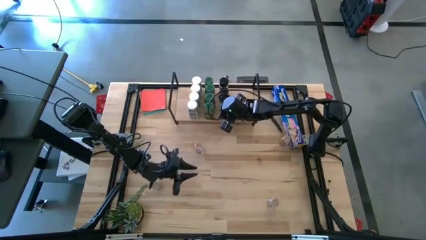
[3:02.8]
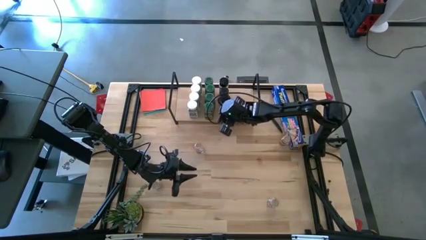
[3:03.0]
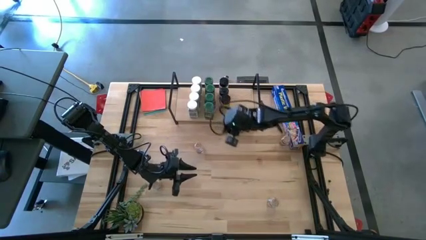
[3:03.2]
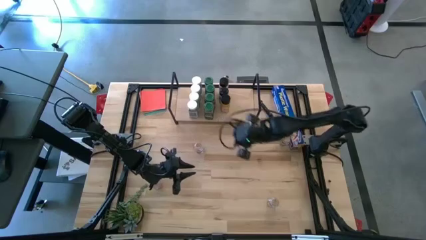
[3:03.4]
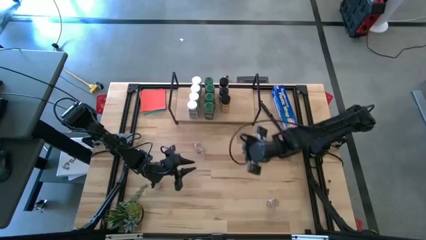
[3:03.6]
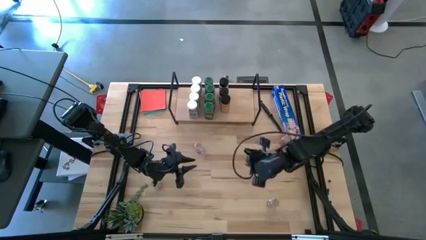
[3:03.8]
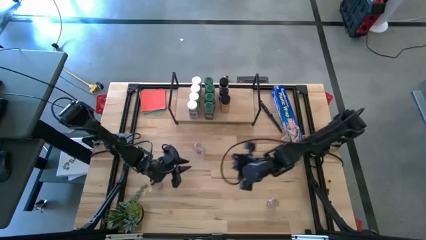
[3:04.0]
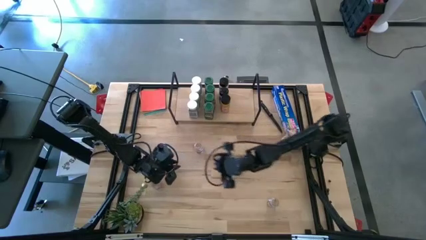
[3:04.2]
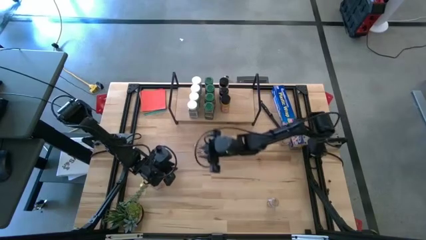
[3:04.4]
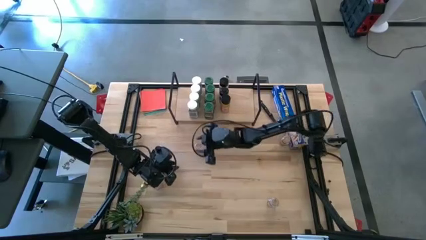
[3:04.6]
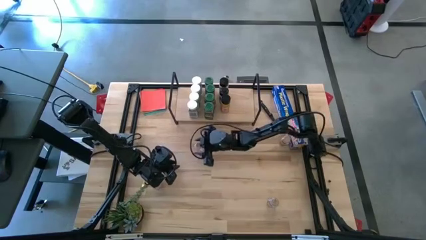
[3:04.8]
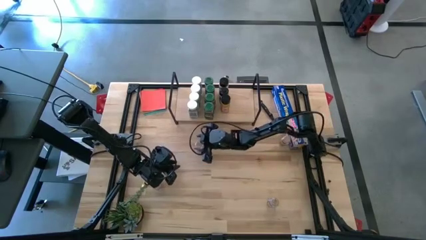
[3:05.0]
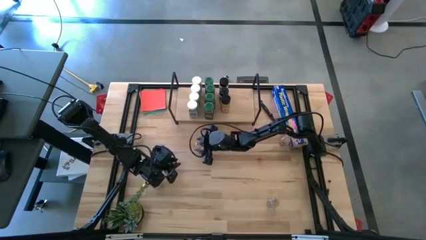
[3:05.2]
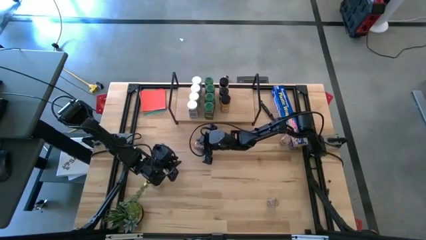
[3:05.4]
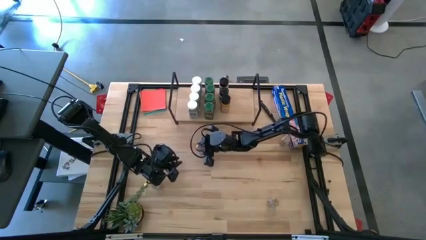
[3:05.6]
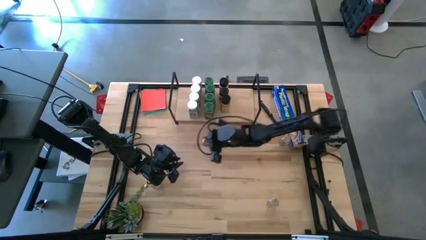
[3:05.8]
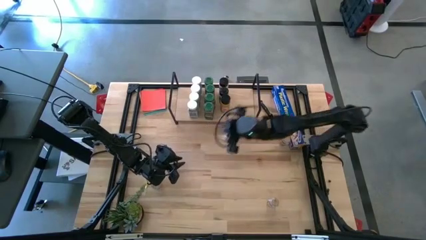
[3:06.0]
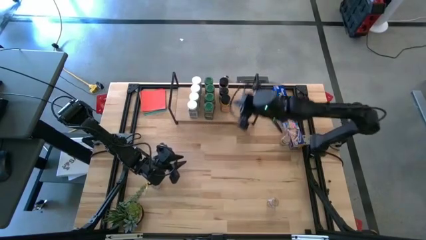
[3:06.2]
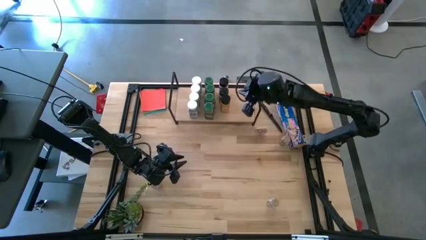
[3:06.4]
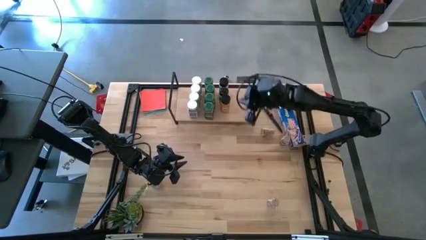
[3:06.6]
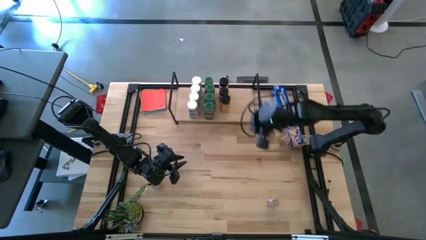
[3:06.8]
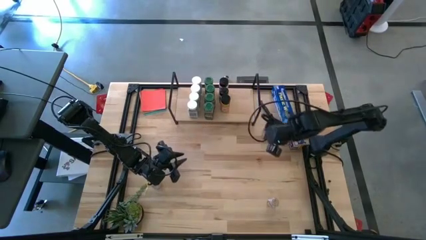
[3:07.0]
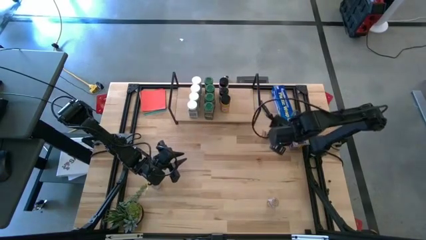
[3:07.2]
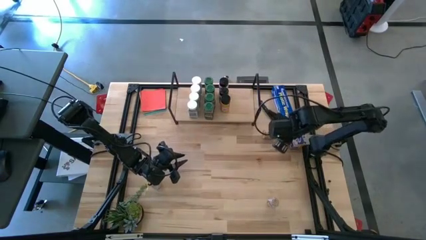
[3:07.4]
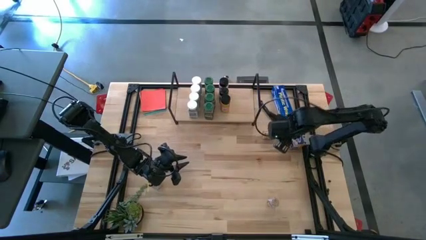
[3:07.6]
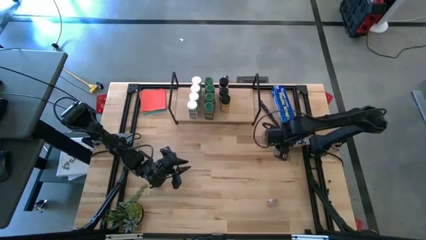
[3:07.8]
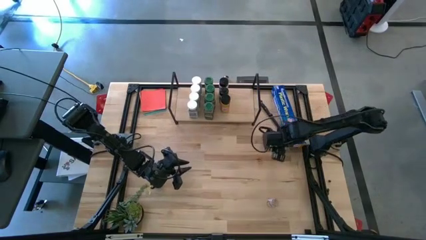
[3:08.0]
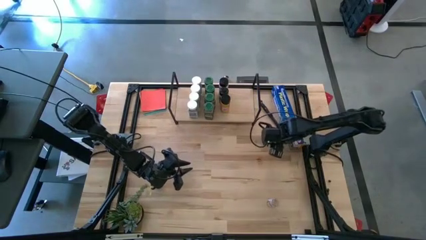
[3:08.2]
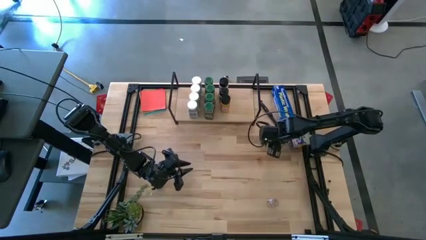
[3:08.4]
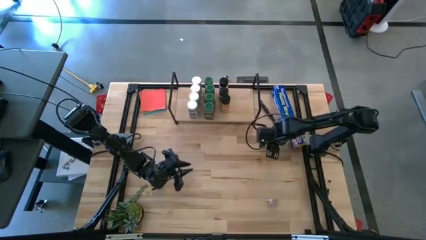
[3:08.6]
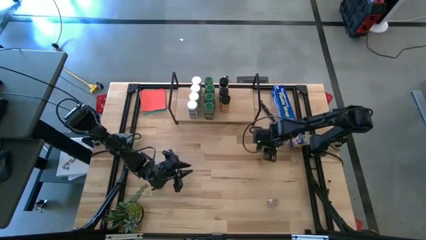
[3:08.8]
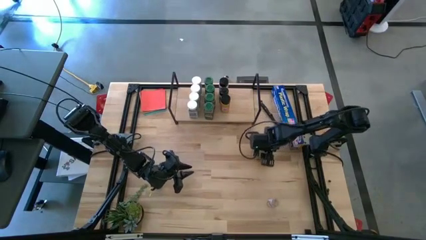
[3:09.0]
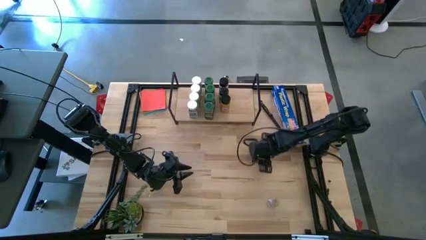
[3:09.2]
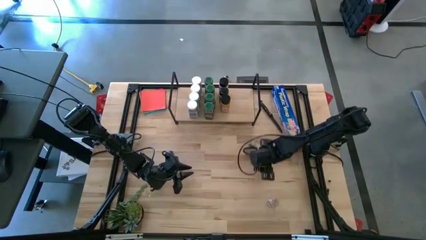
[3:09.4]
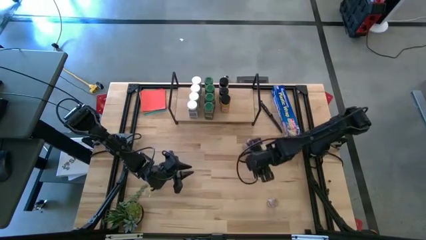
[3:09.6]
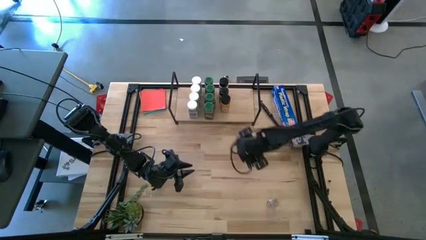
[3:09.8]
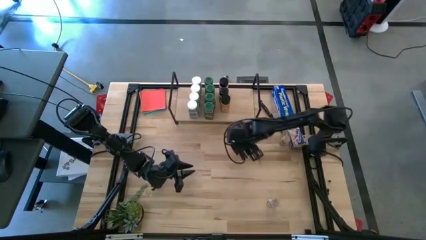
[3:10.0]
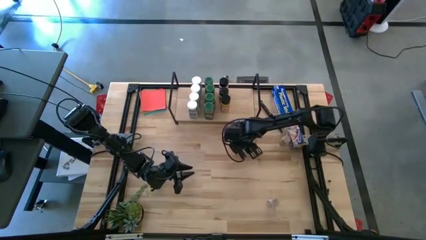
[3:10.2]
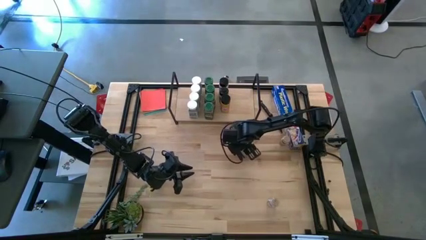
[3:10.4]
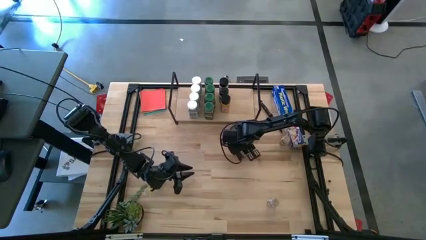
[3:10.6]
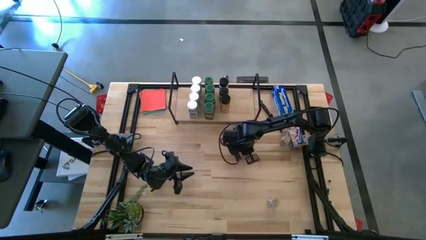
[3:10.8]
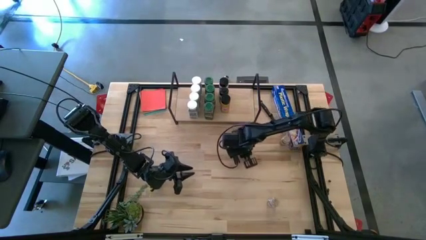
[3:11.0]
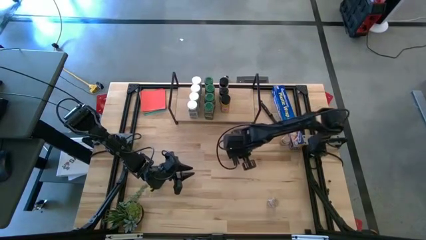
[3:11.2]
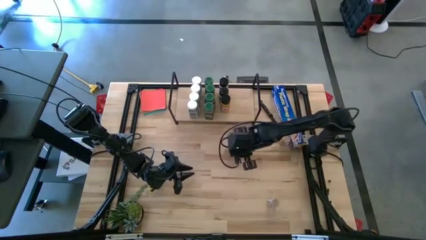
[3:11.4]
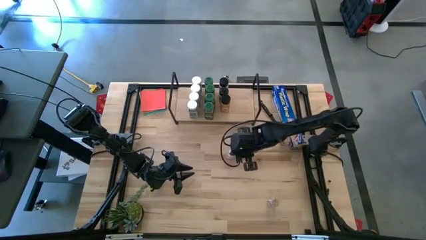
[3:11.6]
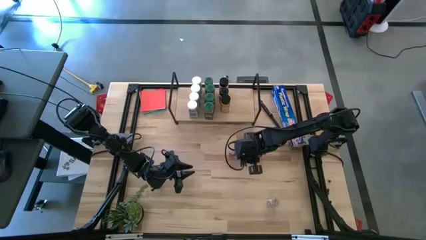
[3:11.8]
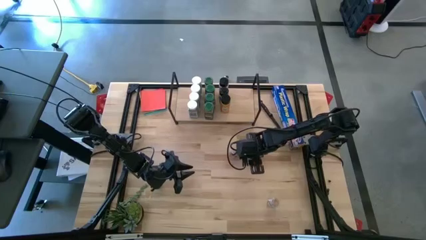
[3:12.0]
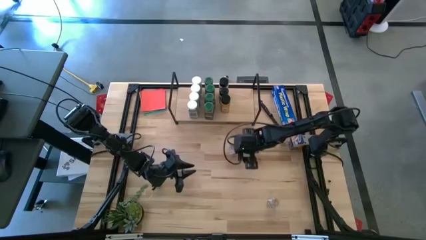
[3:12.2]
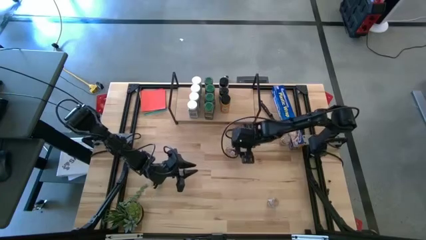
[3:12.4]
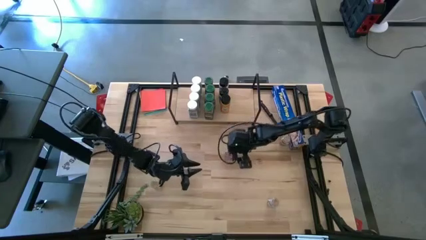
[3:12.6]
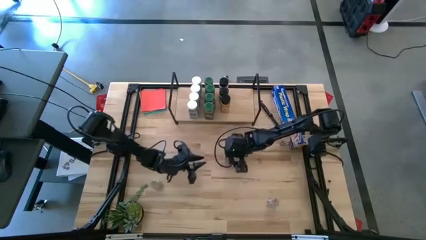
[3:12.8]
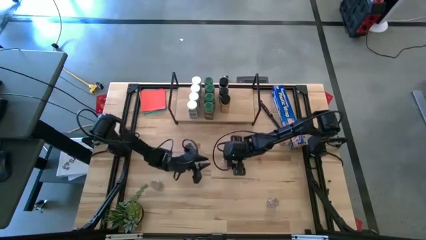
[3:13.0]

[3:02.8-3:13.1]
Task: Shelf spices
Put the top left brown seasoning bottle on the shelf

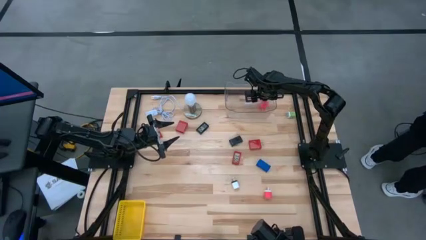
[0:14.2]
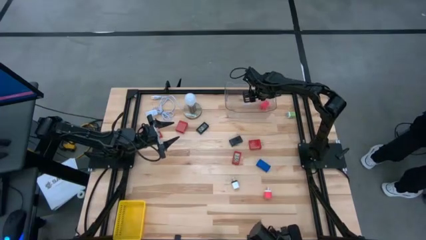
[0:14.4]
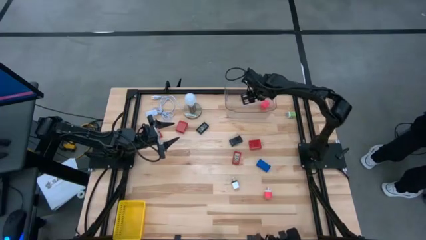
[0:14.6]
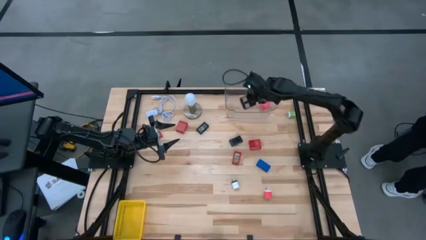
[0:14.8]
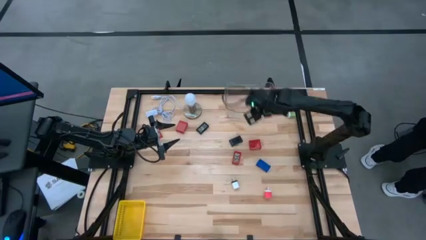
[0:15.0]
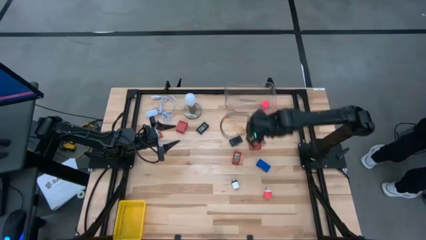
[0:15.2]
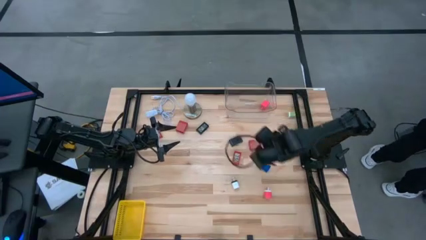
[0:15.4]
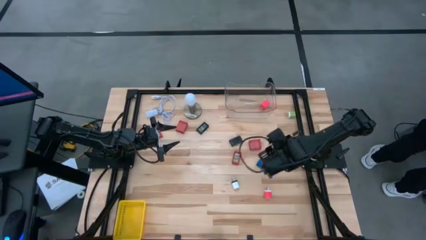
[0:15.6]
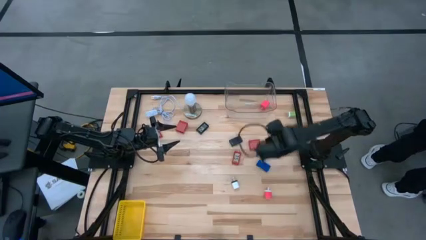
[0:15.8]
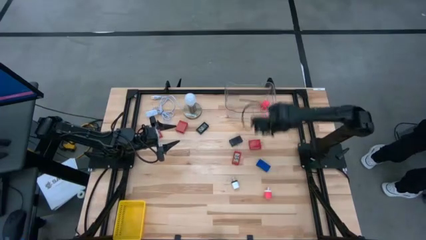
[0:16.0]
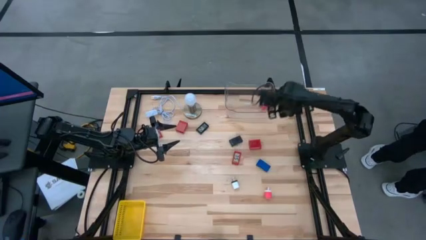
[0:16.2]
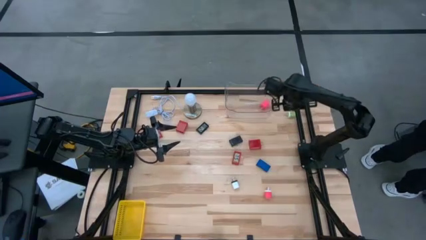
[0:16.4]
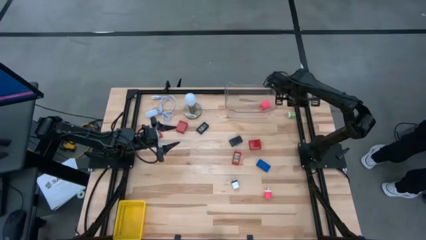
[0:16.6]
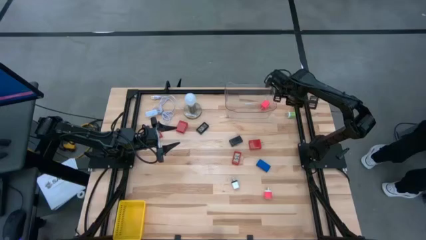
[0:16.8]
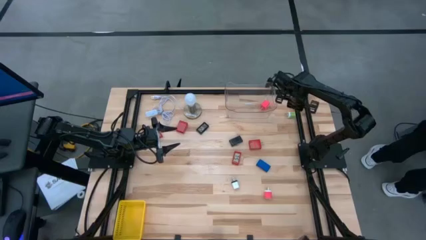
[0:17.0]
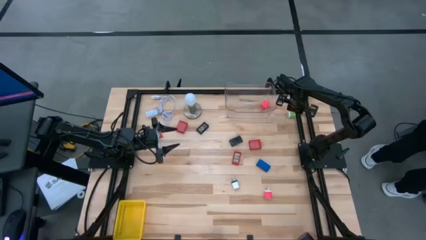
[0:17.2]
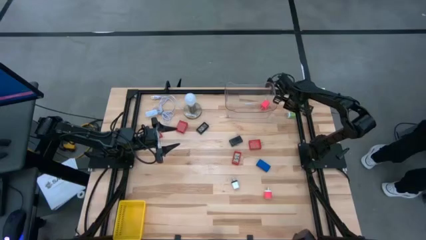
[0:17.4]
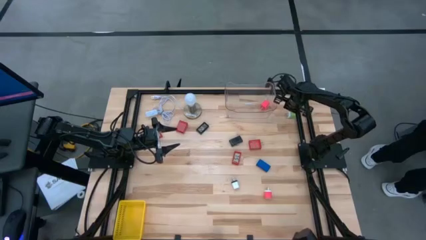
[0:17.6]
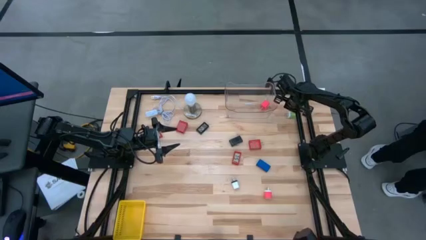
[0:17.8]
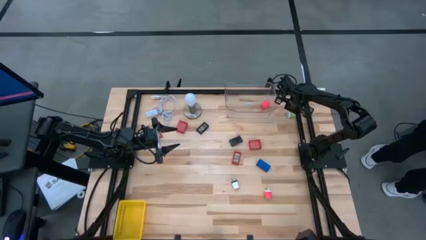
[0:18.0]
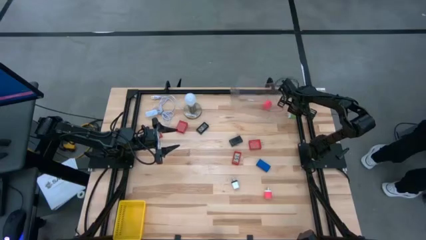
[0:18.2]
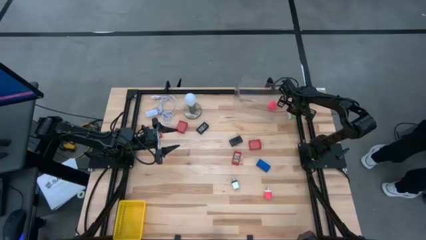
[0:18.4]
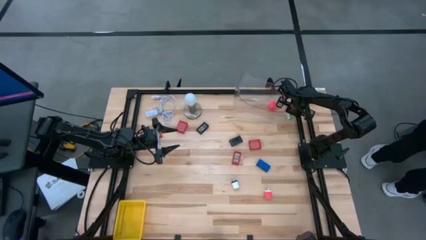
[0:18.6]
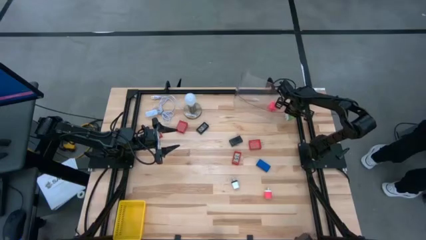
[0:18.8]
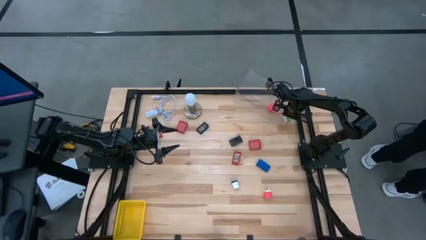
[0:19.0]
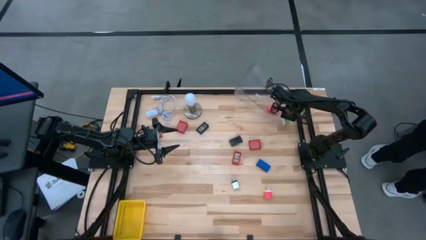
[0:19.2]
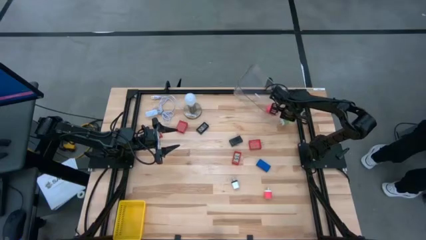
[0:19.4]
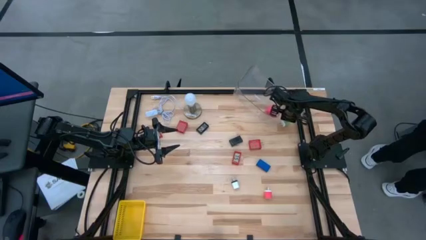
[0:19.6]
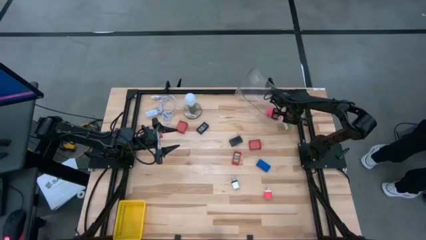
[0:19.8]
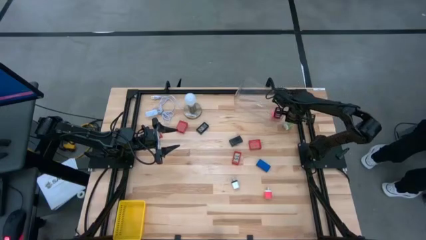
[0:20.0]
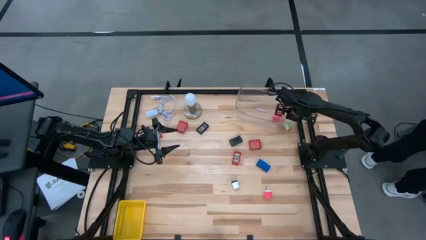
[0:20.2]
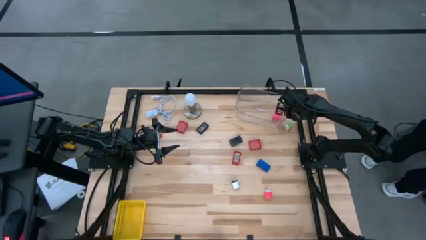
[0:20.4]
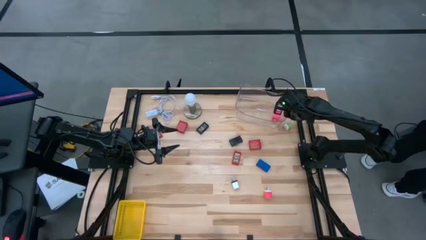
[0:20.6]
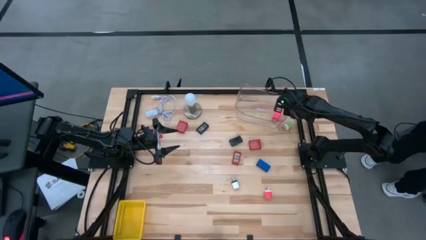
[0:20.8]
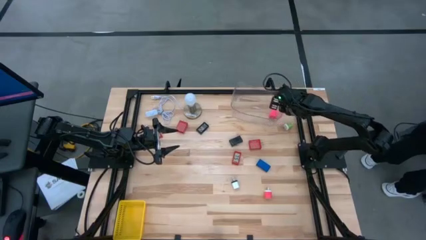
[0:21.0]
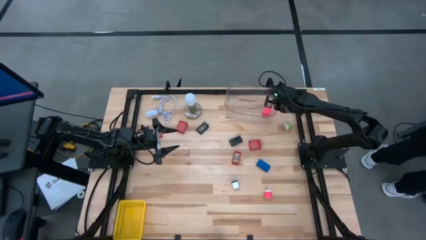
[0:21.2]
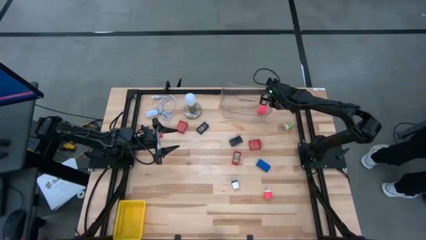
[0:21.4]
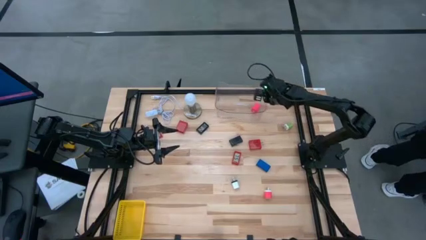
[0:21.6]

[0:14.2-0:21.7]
Task: Pick & Place Office items
Adjust the transparent bin
